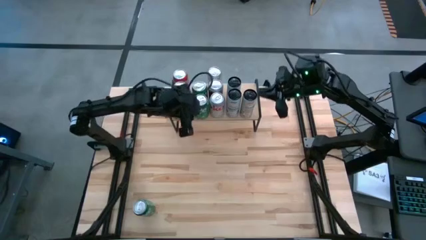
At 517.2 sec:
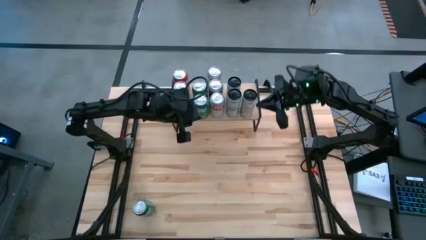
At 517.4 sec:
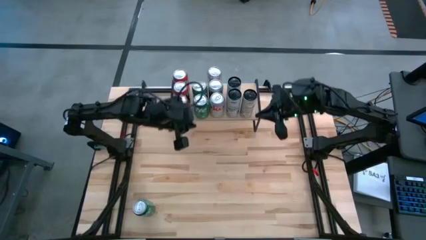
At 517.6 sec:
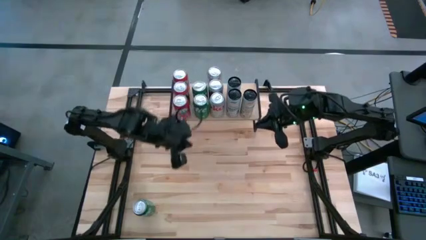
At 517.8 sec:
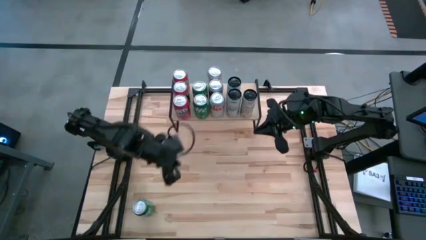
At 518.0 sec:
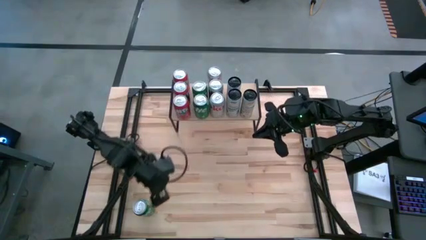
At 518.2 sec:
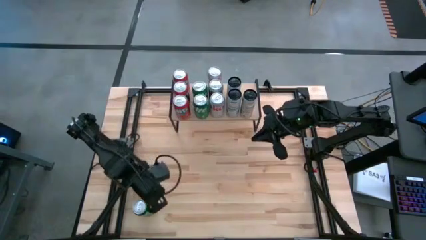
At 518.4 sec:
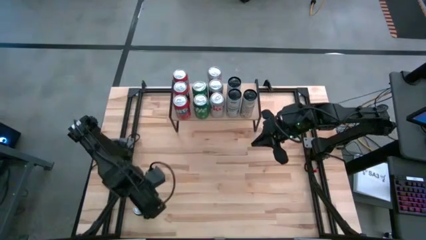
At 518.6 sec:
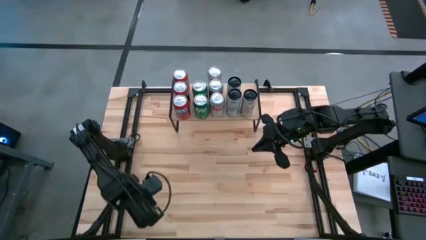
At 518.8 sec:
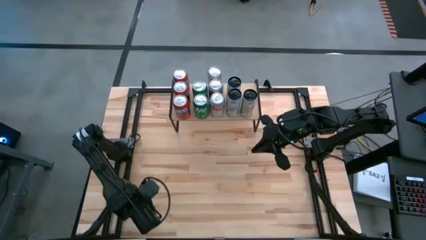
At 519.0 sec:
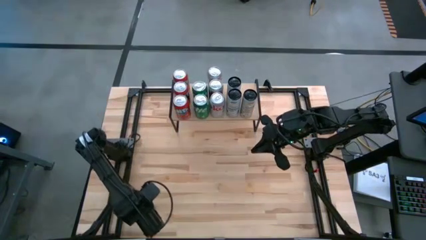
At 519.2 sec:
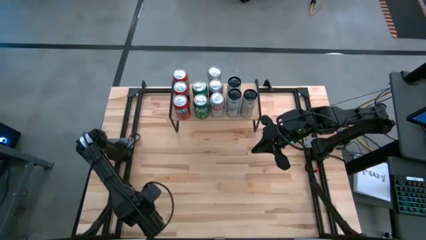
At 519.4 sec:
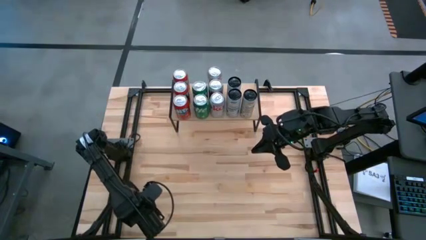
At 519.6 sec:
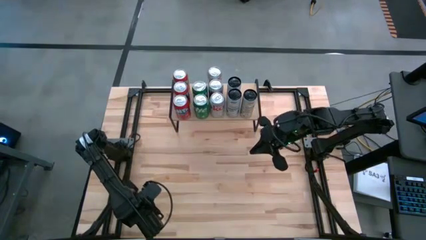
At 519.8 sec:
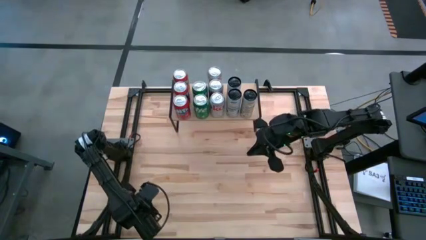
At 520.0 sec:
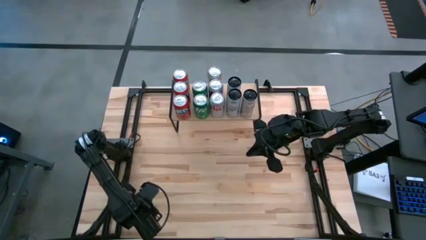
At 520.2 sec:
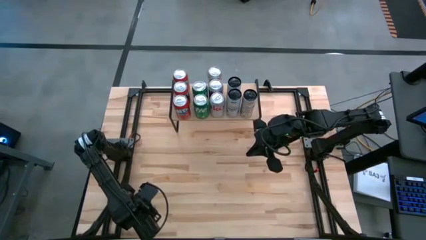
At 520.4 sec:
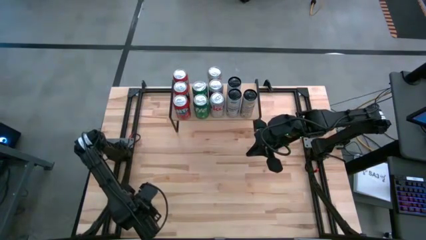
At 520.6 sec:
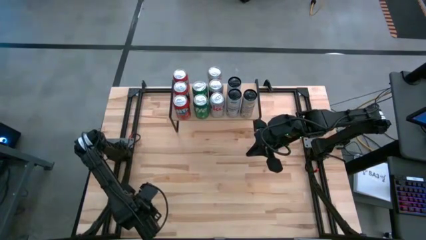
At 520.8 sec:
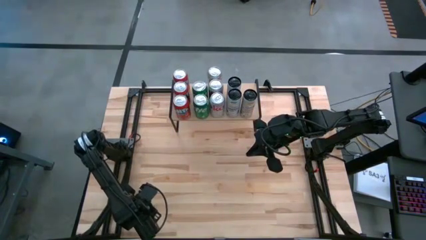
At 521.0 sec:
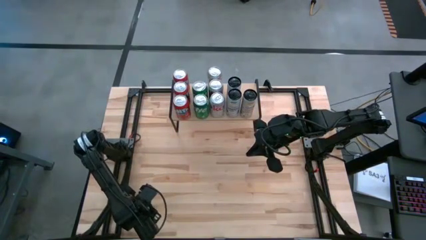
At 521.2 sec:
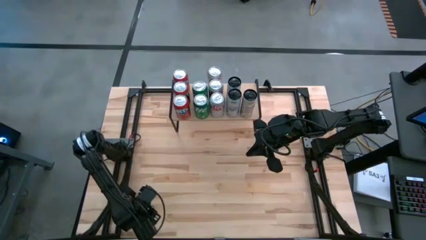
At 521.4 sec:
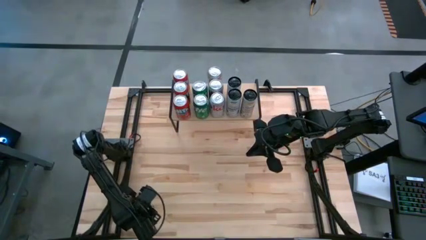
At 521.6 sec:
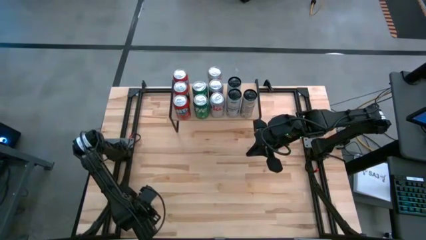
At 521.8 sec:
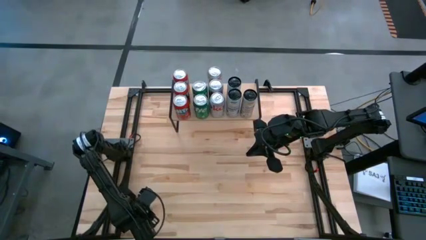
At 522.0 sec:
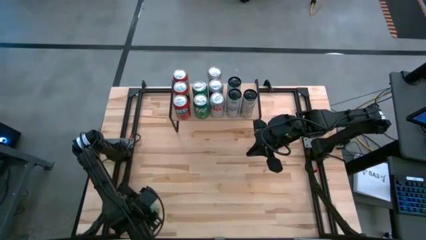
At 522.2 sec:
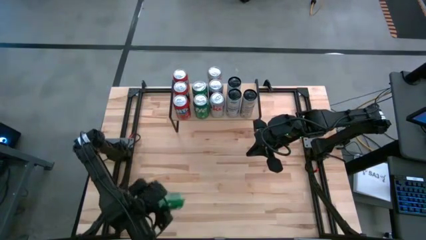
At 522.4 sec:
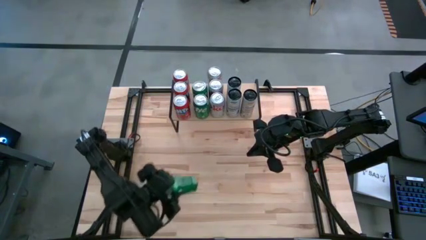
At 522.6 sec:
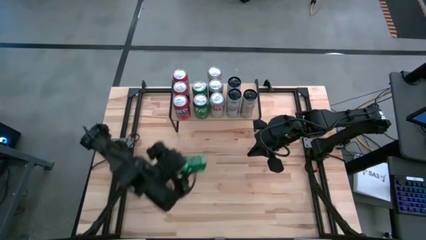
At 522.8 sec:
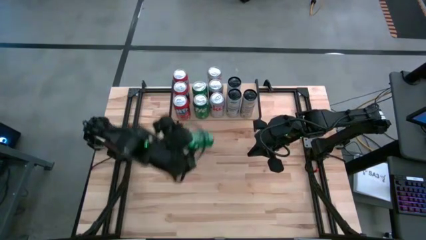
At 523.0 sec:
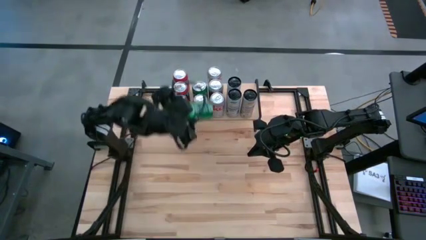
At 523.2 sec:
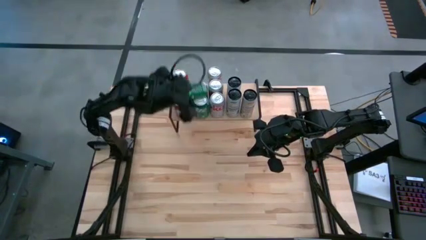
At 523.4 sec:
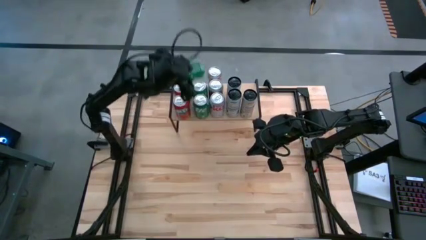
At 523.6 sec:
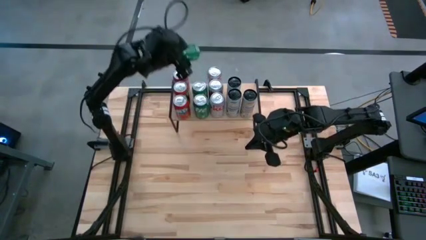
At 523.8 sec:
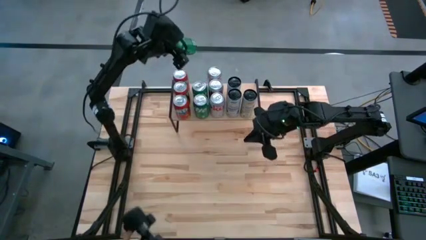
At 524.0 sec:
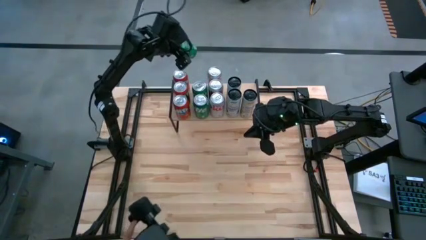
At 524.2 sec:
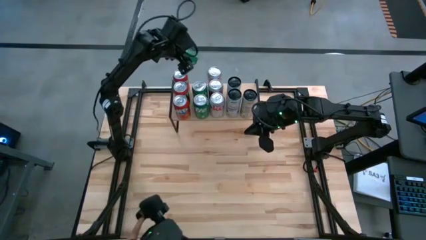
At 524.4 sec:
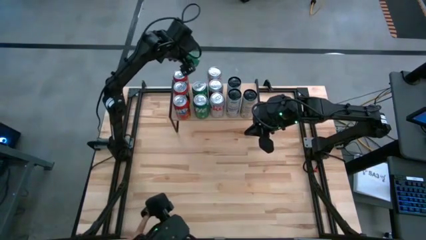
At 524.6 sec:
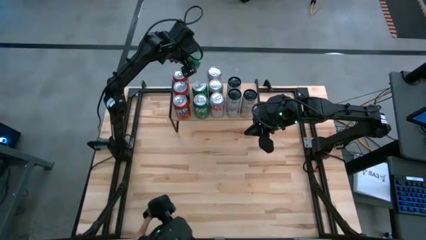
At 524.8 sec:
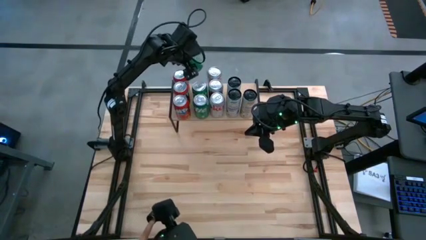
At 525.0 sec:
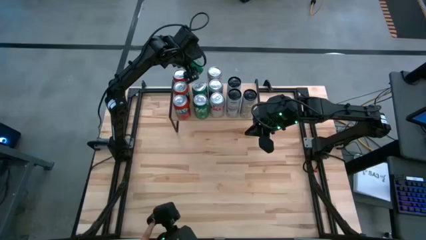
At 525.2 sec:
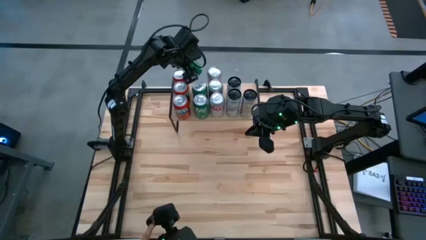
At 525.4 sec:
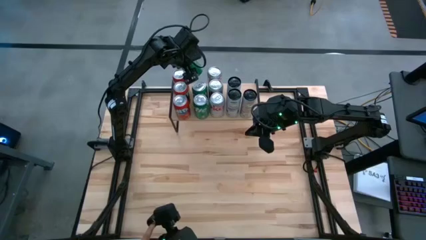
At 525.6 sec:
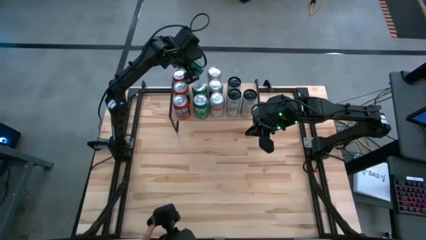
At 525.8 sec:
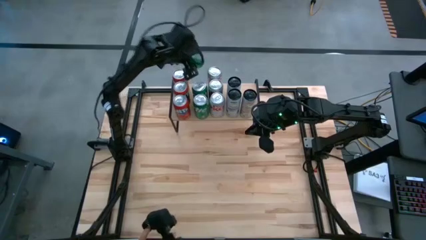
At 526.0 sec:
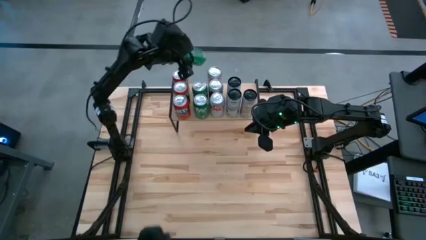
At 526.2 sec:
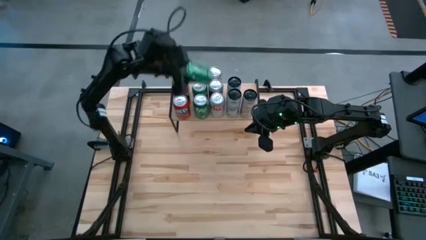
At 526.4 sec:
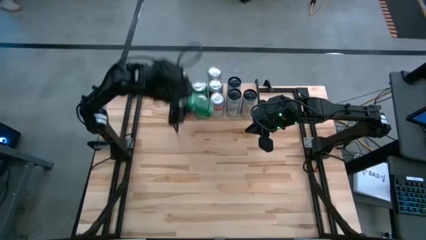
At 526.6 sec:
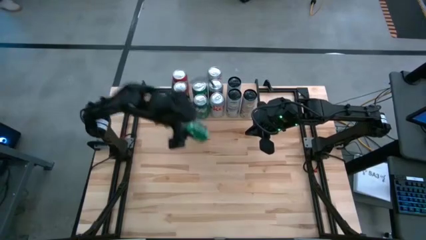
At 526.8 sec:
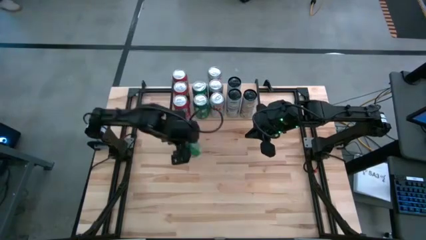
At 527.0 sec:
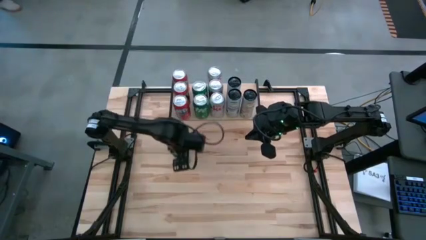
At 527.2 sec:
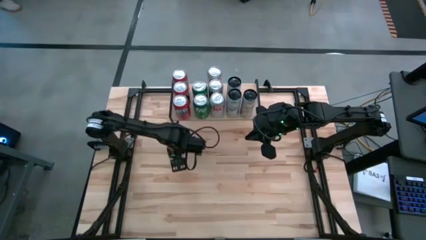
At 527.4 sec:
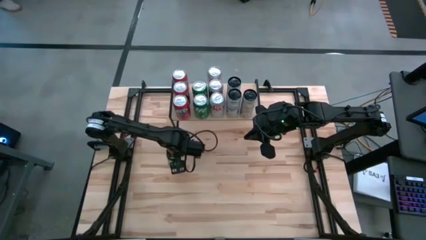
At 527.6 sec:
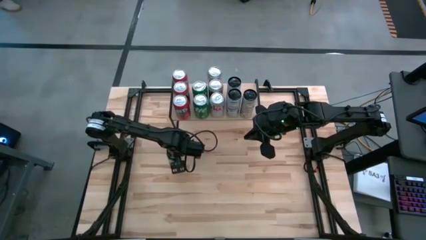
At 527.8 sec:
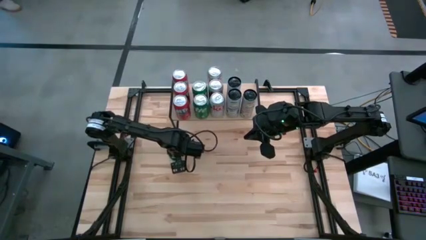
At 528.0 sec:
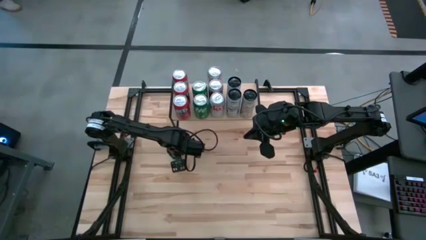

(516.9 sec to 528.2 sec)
Task: Place canned beverage on shelf
Put the green soda can on top of the shelf

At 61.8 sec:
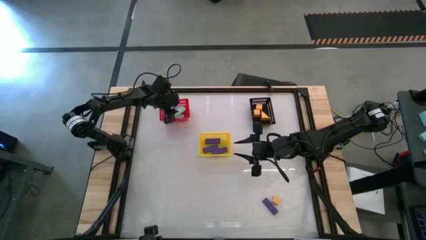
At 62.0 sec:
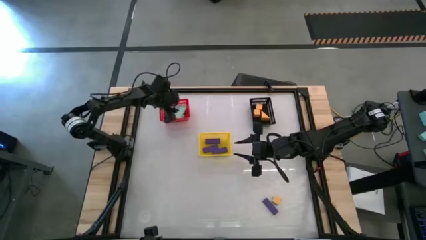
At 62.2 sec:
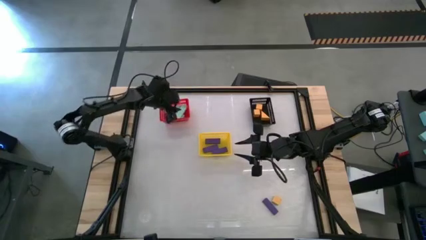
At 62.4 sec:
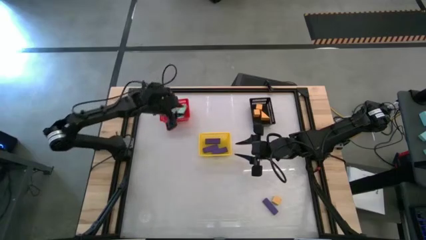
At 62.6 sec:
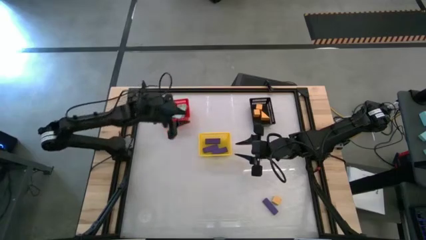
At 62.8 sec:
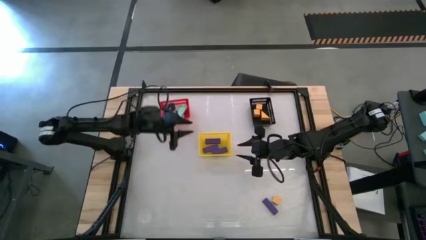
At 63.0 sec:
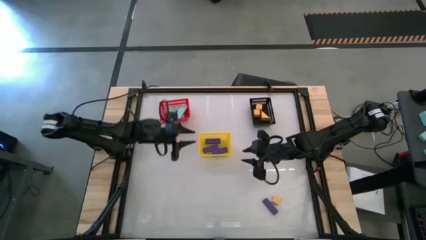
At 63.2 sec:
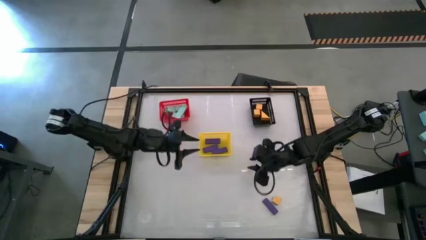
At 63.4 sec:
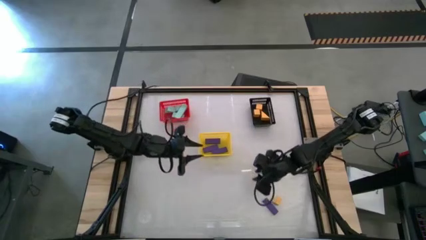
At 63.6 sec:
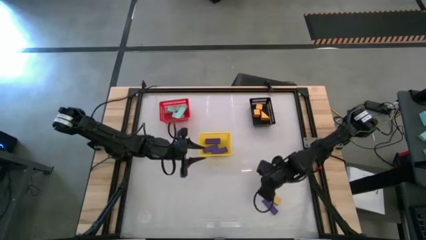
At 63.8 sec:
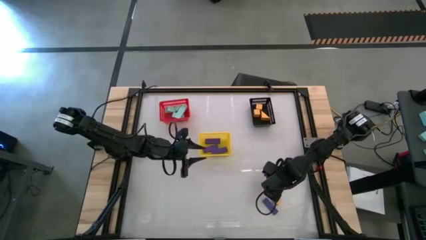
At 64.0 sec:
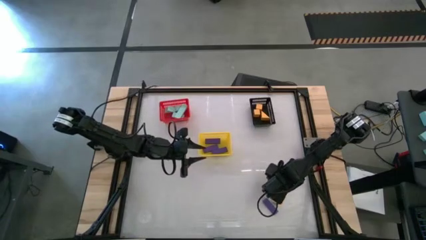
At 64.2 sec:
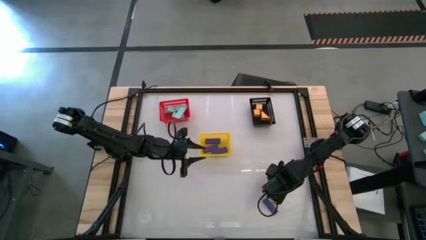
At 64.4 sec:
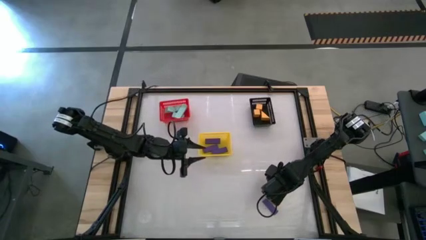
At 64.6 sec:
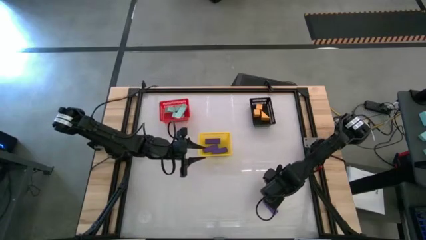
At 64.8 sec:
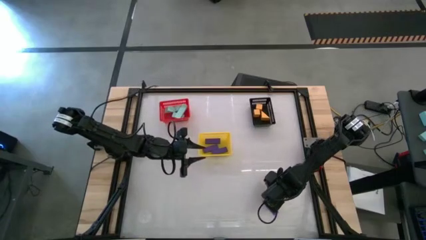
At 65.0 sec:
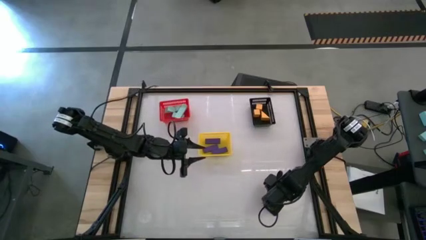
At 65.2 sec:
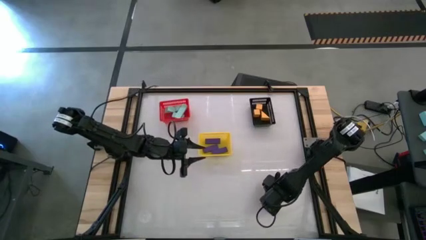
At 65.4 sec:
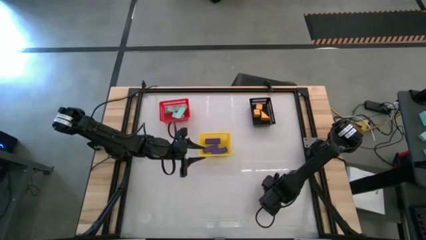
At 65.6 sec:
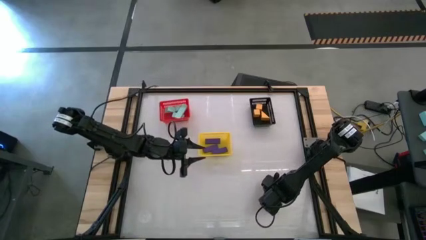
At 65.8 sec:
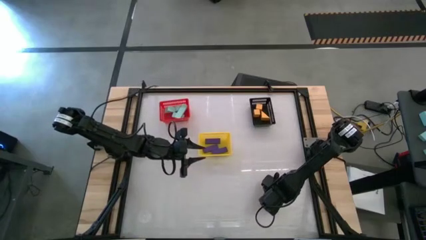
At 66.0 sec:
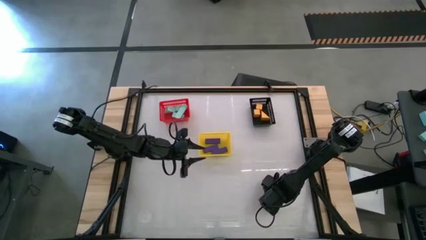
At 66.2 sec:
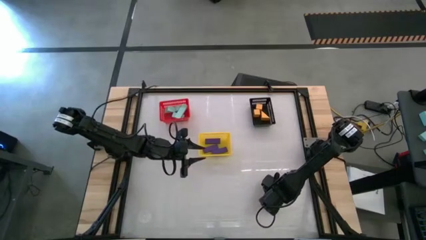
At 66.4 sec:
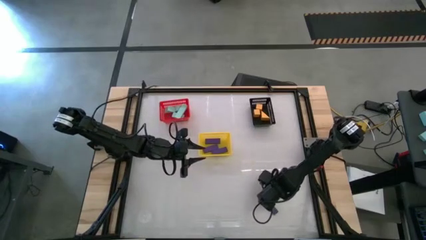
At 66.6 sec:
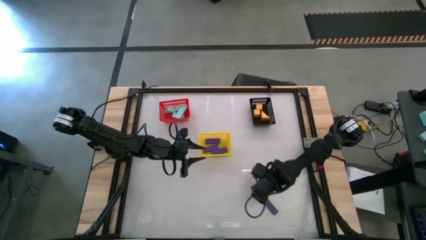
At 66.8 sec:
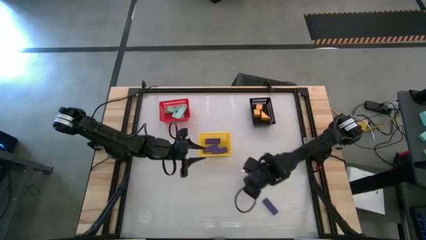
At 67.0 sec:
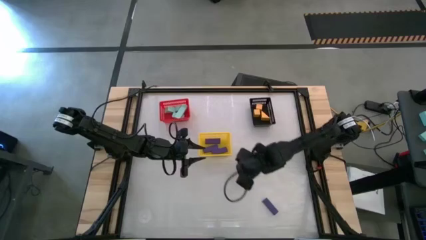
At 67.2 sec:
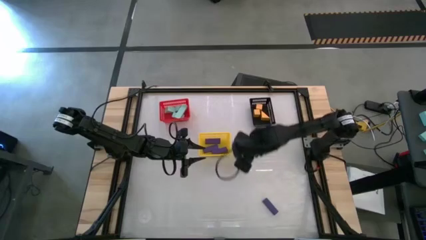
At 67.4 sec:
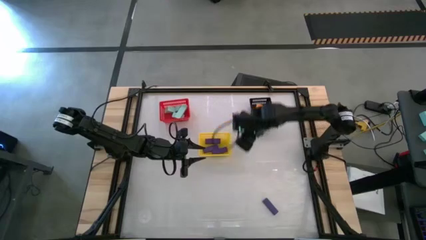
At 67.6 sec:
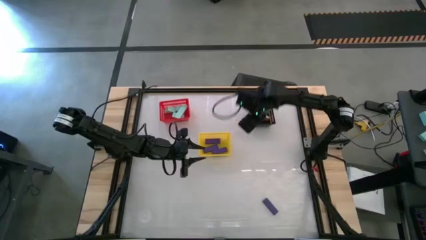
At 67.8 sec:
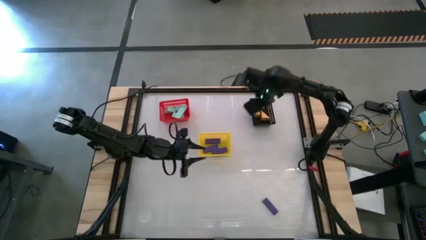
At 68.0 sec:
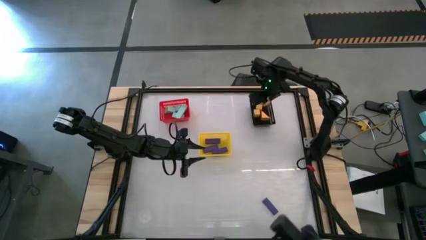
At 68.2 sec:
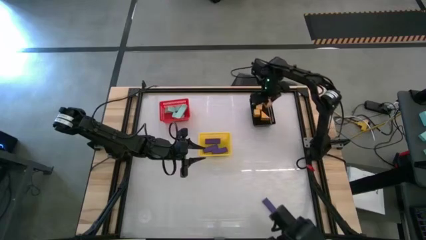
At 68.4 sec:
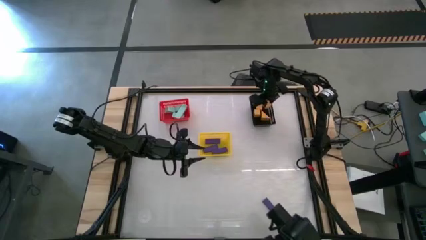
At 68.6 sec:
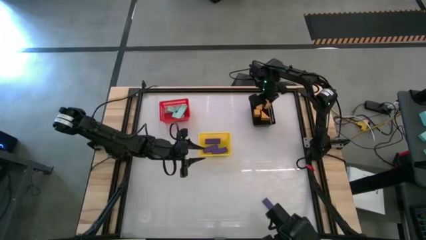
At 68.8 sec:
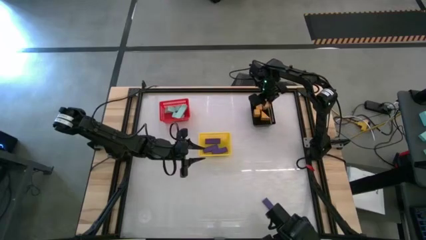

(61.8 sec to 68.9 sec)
Task: Sort & place blocks by color
Put the orange block into the black bin
